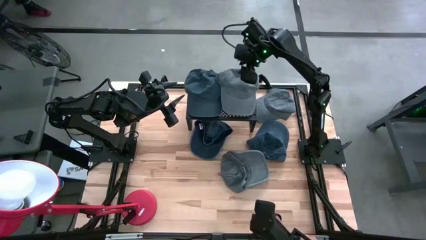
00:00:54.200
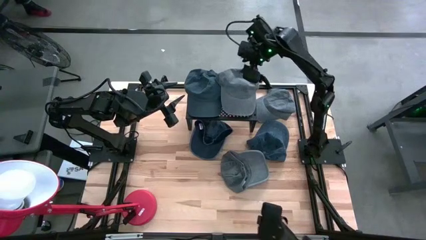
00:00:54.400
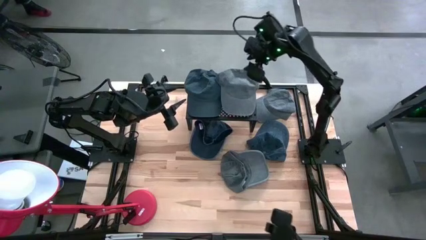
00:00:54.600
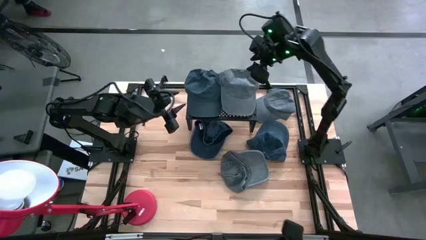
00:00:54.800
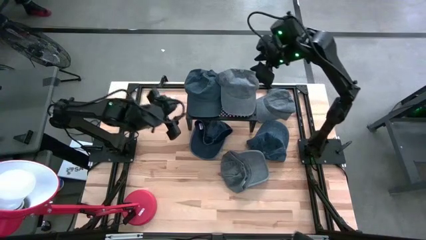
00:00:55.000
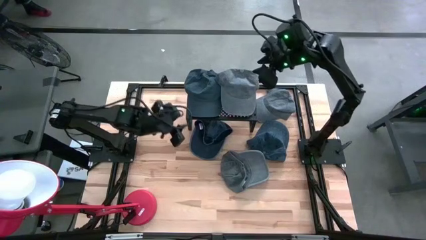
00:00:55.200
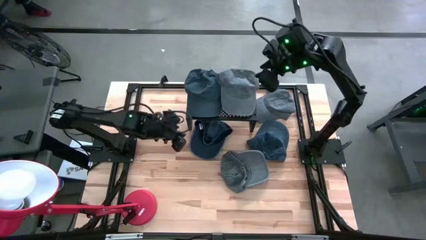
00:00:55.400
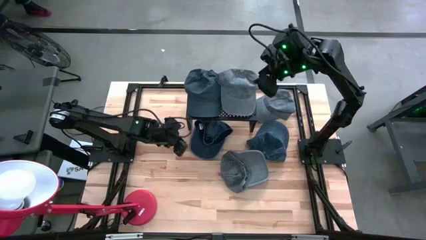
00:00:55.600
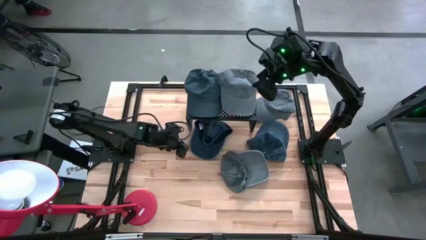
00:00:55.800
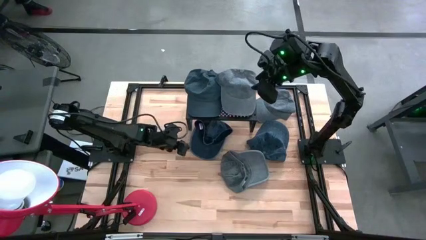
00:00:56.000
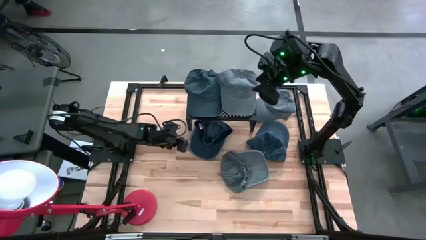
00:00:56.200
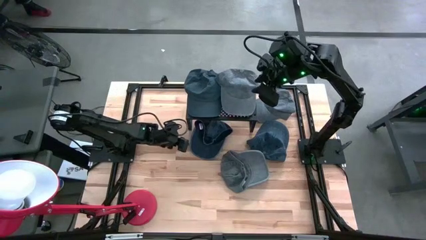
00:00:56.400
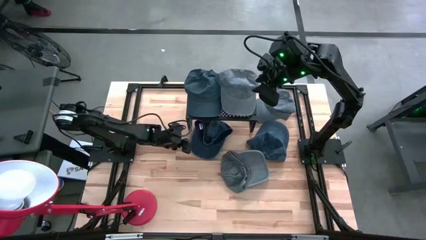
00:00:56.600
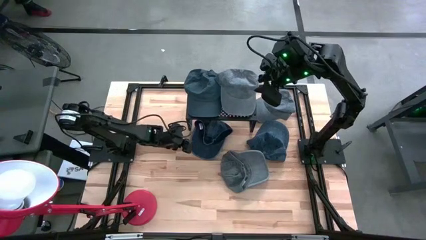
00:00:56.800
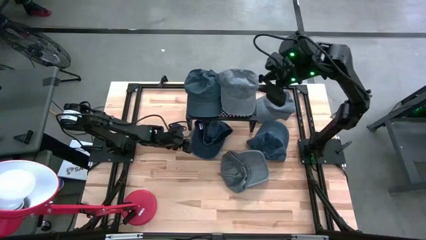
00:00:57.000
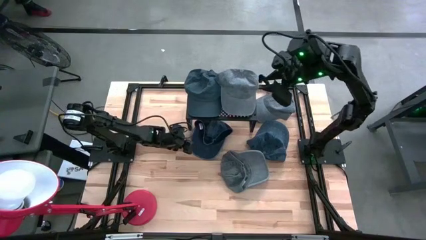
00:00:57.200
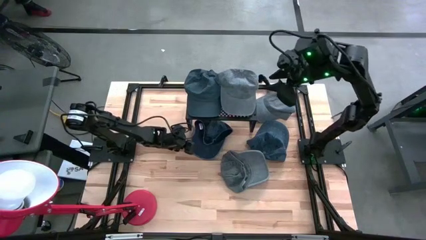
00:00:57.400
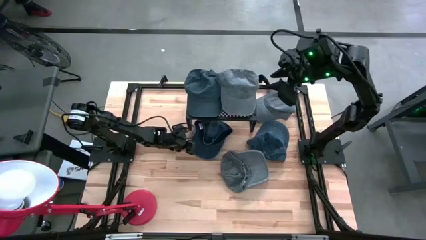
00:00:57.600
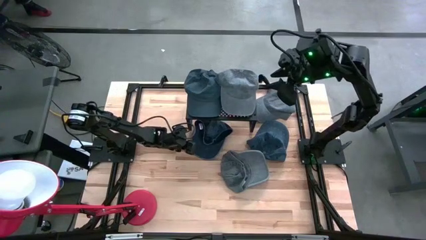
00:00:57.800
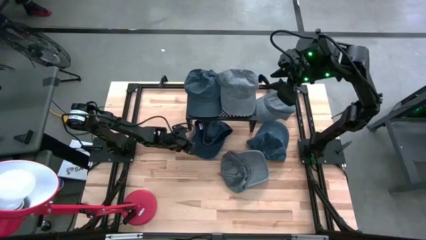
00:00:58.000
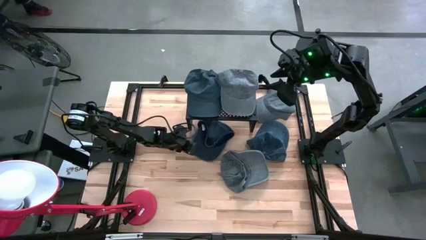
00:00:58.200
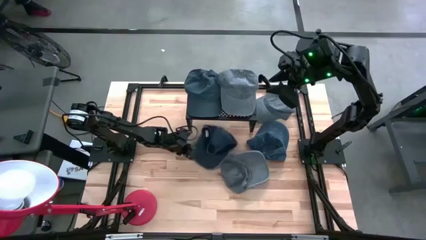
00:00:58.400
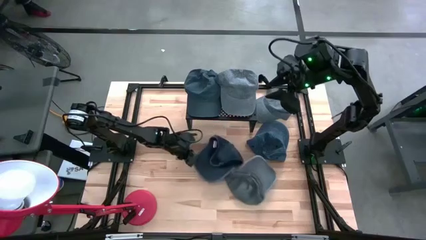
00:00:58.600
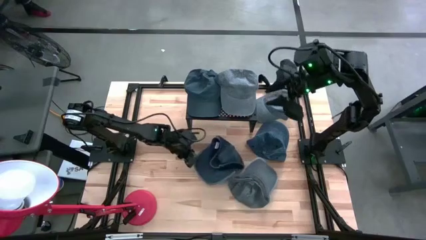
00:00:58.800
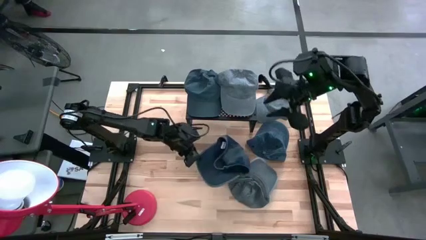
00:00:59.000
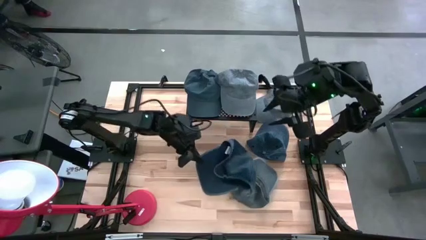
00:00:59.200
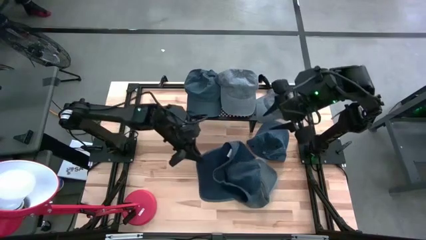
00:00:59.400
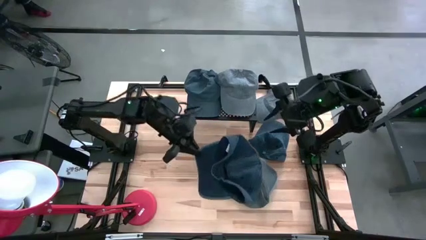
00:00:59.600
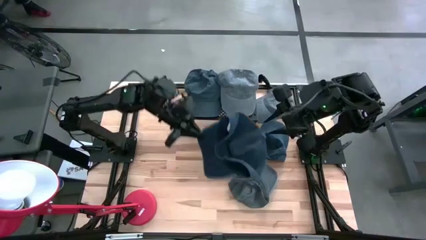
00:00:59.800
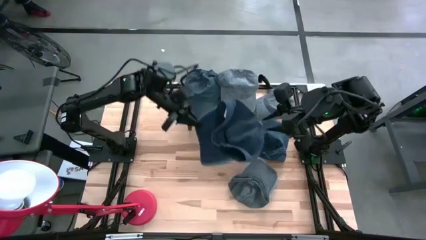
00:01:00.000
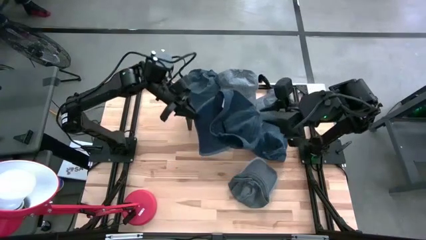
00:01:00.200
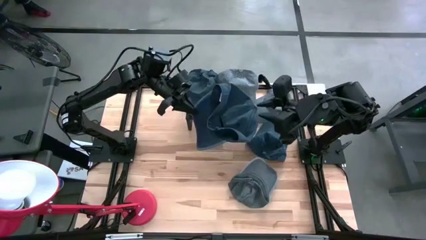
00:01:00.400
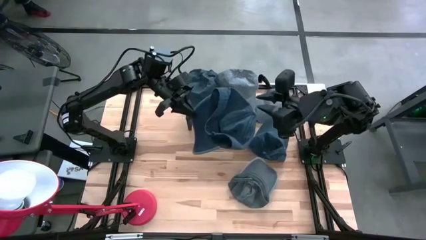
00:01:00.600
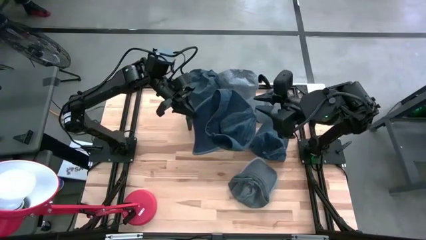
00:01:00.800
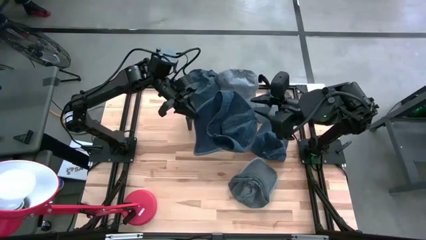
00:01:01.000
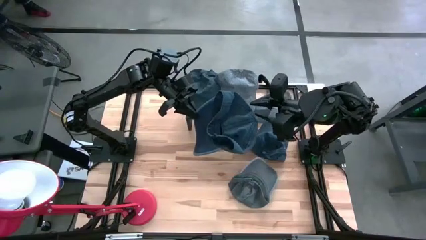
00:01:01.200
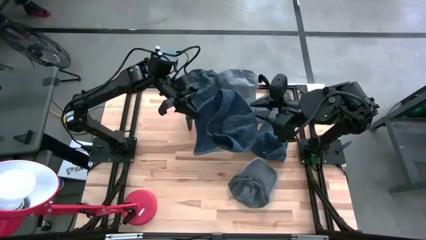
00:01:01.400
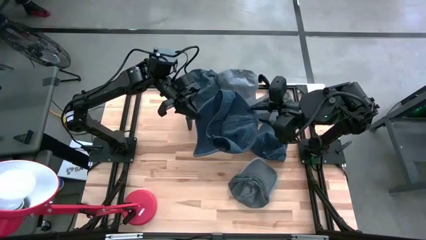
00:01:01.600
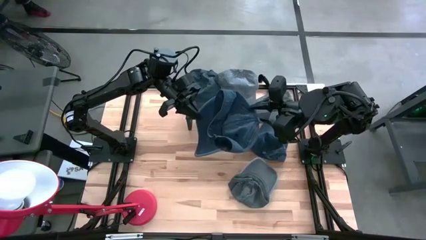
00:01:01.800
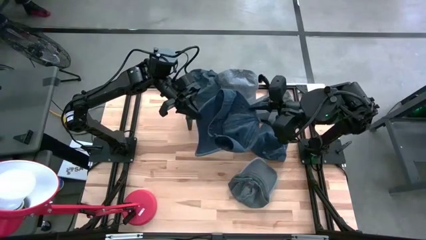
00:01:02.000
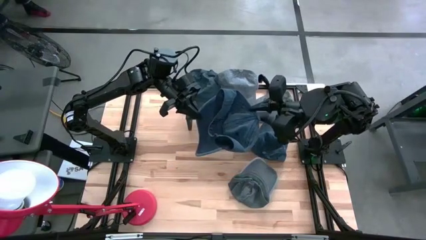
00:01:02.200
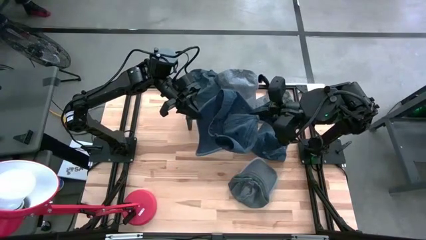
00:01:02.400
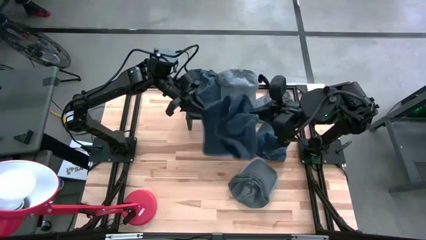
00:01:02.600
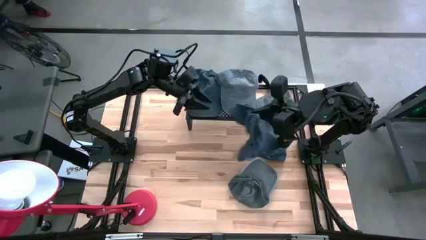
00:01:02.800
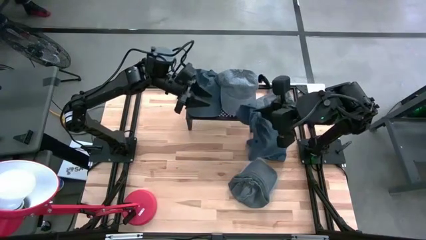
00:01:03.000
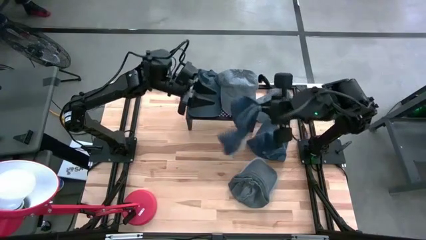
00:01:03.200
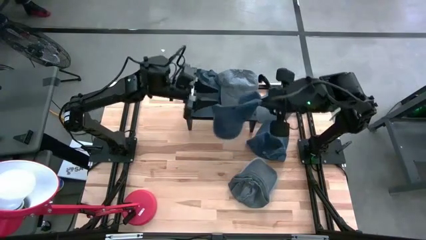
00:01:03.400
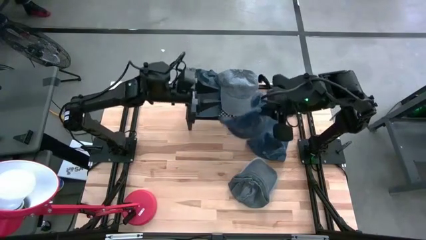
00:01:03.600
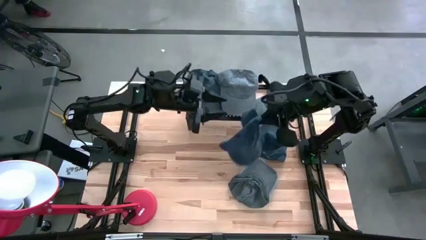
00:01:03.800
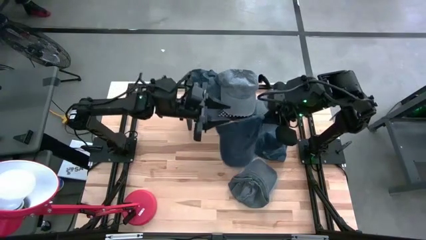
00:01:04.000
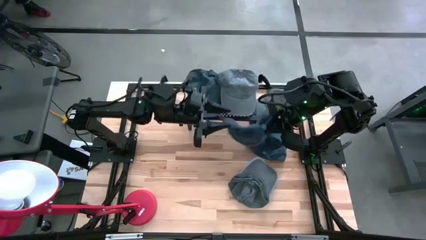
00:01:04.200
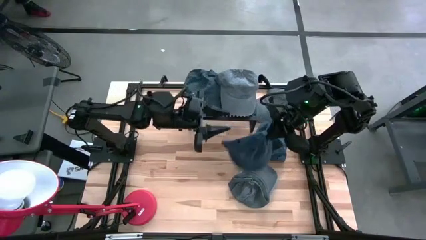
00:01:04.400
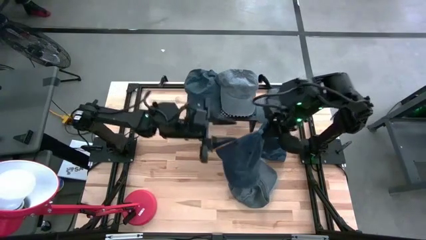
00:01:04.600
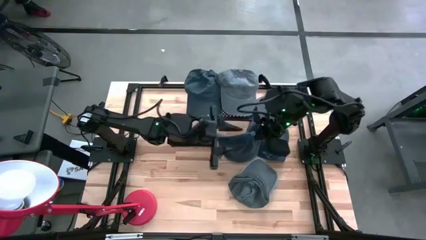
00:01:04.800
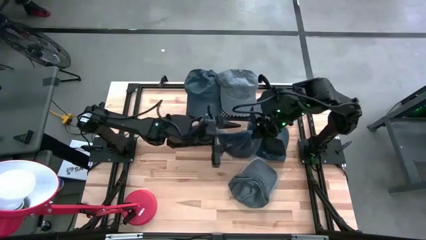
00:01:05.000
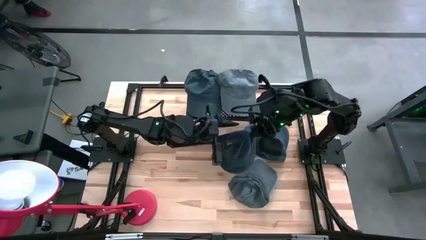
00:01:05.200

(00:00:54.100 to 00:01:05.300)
Task: Pick & Place hat
Stack the left blue cap on top of the blue cap on the shelf

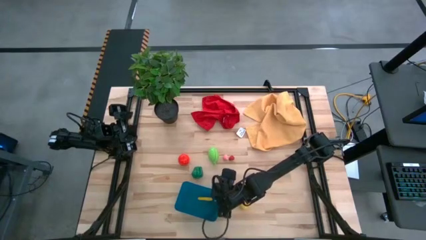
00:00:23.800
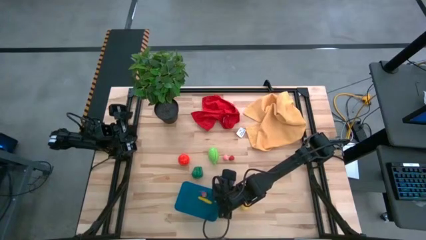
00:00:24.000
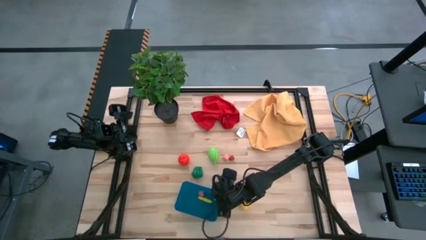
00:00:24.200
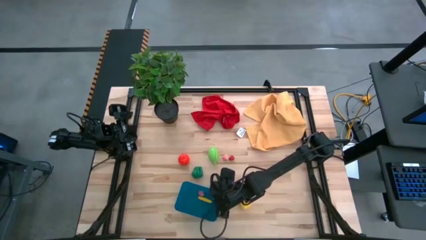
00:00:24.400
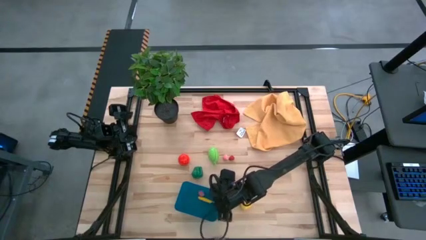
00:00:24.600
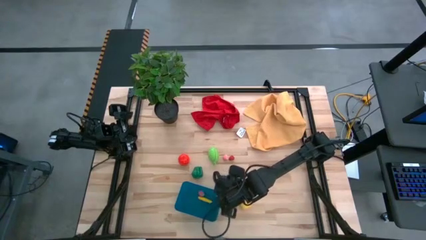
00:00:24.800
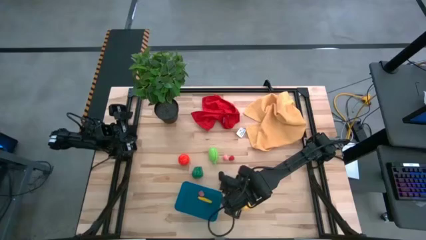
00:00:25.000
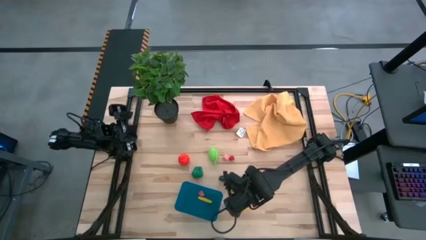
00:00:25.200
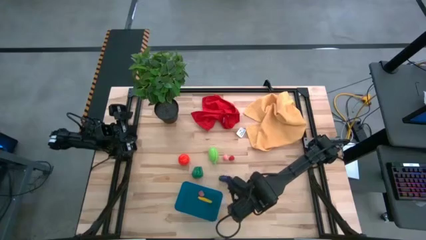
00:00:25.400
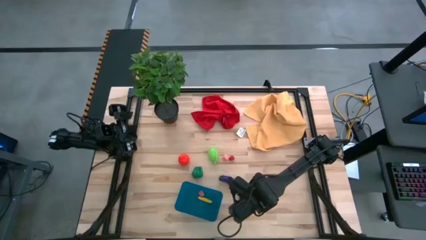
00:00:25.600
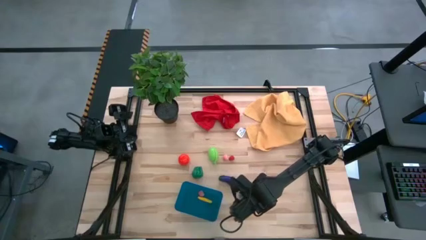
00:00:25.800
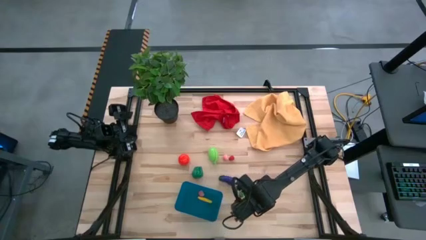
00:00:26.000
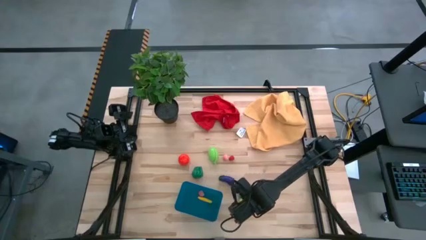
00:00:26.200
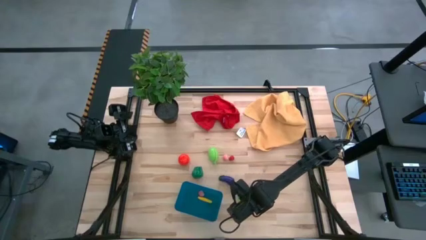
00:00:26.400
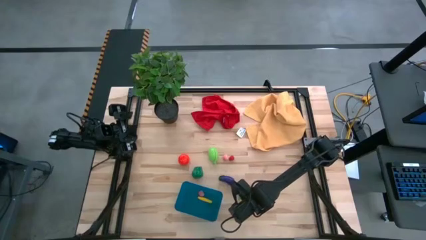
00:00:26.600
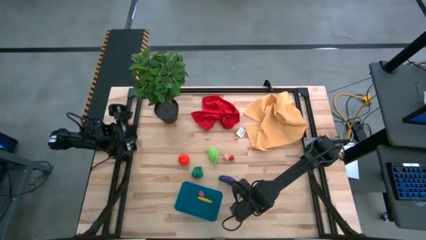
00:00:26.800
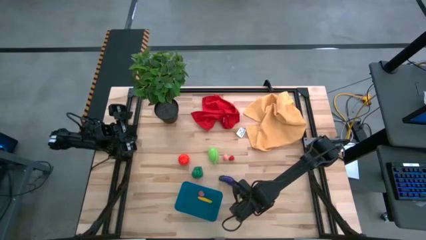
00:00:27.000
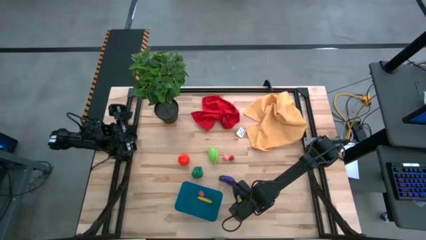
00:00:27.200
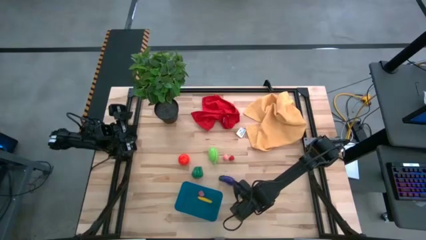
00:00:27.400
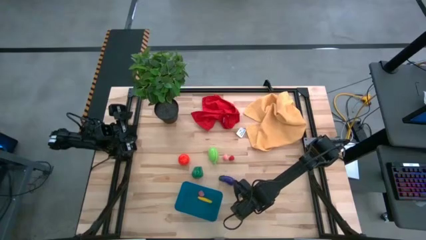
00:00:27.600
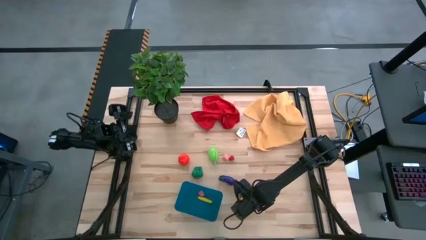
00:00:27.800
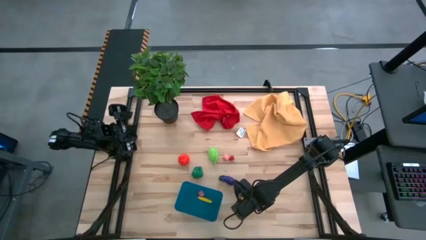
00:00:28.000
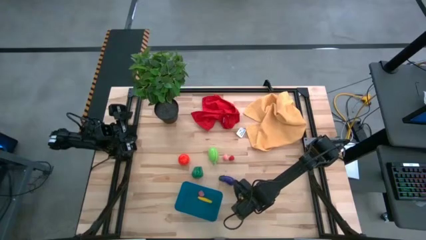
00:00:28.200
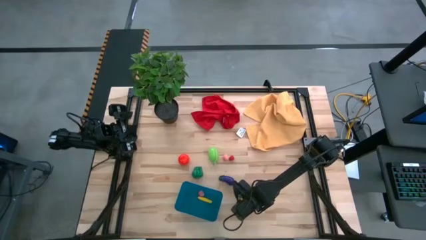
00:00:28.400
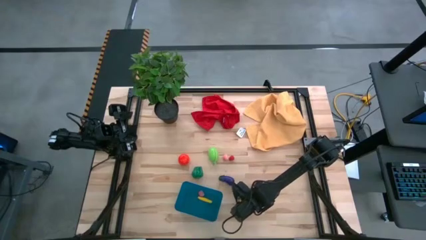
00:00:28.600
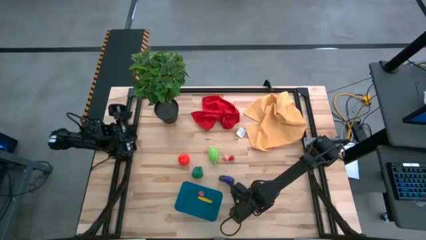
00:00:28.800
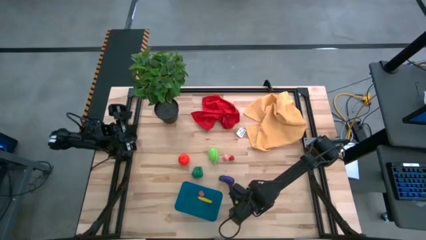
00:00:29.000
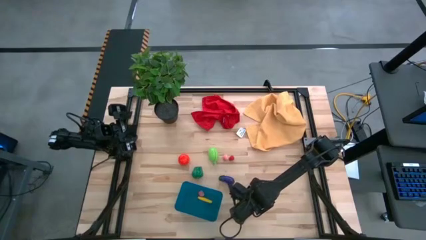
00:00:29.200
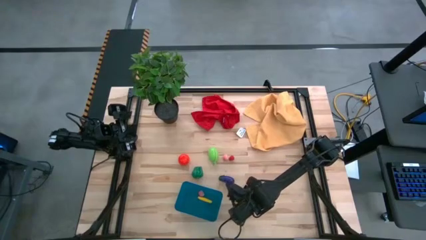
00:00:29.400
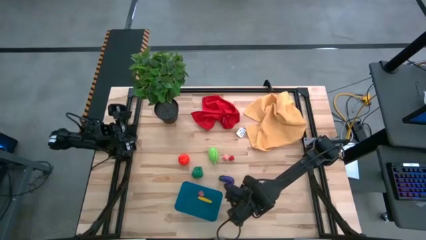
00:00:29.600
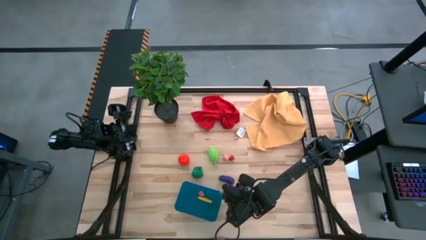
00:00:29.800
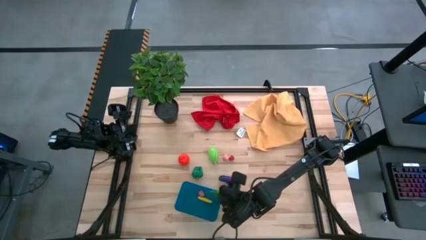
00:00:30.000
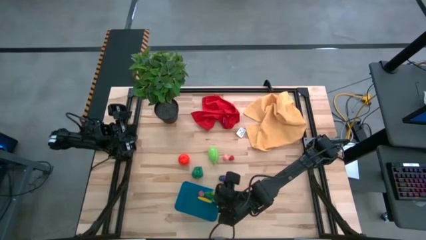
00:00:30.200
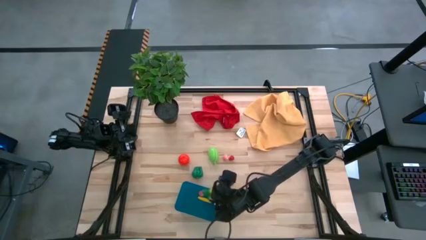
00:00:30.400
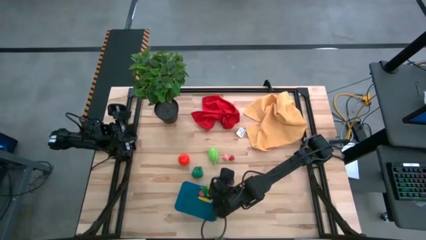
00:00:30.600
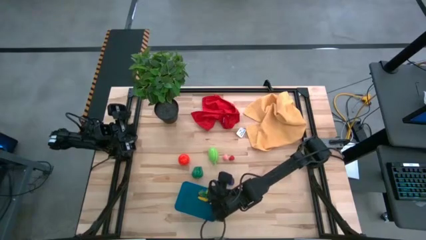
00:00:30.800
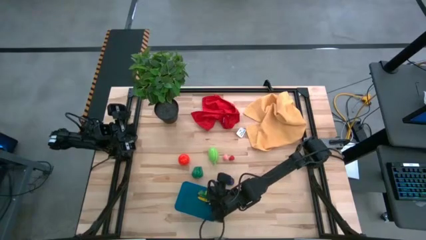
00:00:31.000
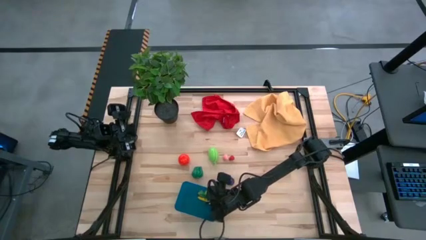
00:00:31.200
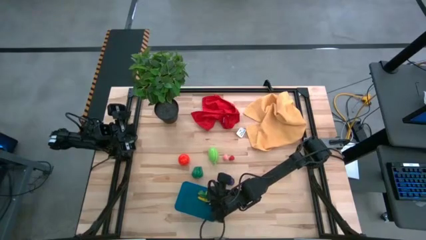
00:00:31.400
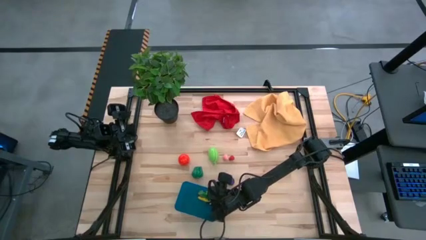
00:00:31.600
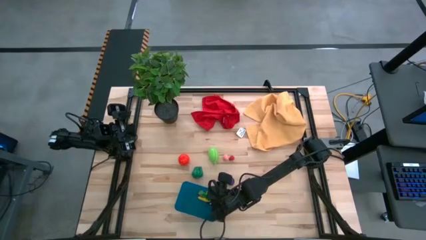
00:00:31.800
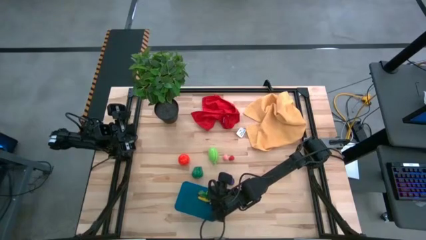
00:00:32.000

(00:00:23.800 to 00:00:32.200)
Task: Pick and placing Produce into tupperware
Put the yellow pineapple into the blue basket
